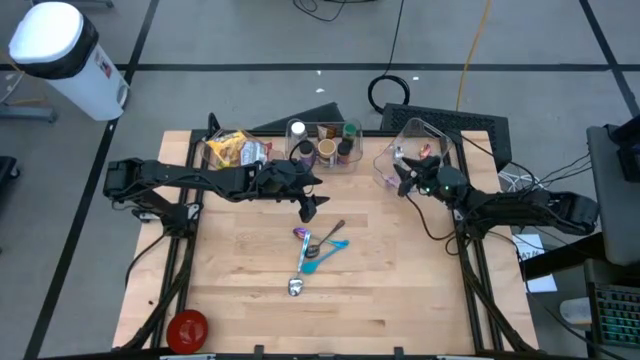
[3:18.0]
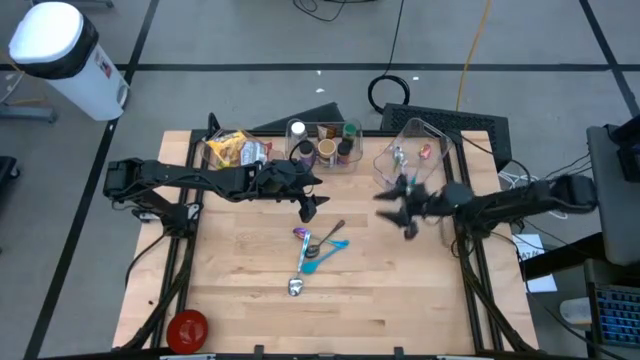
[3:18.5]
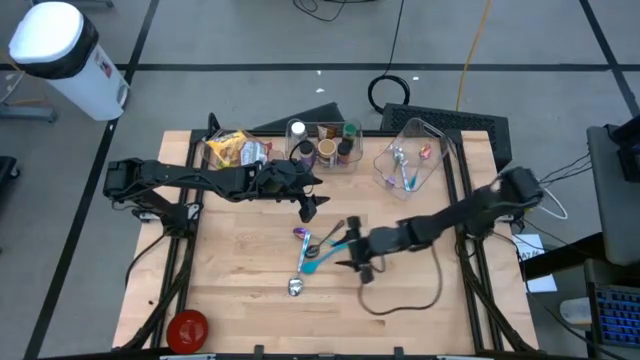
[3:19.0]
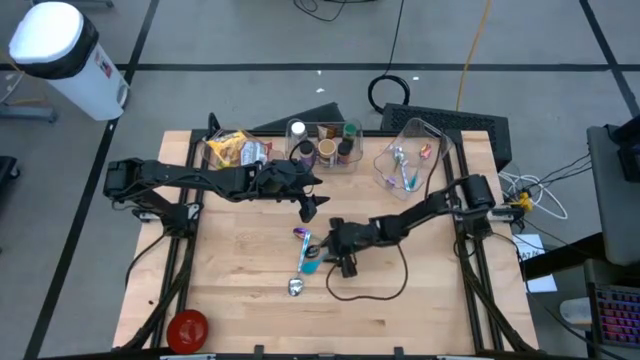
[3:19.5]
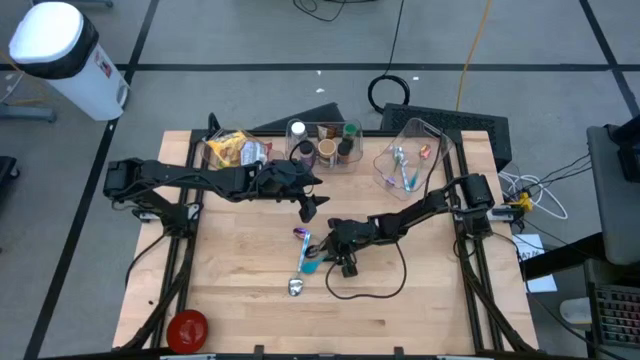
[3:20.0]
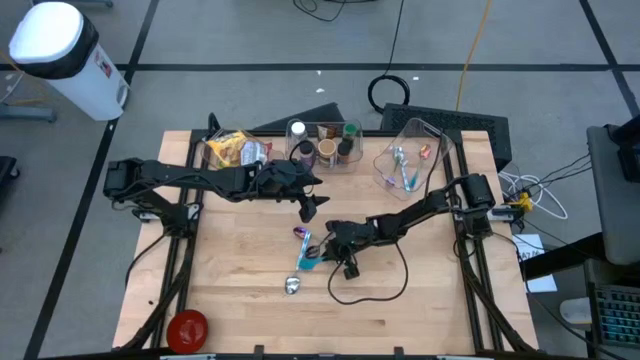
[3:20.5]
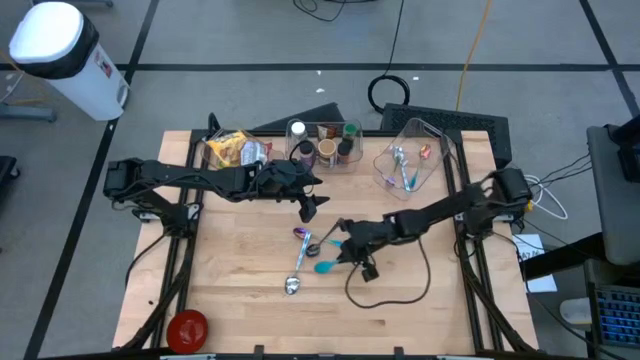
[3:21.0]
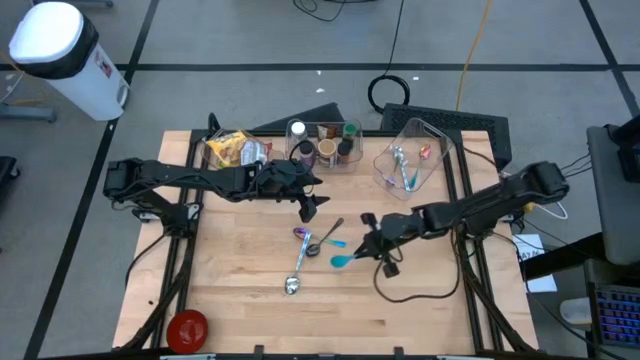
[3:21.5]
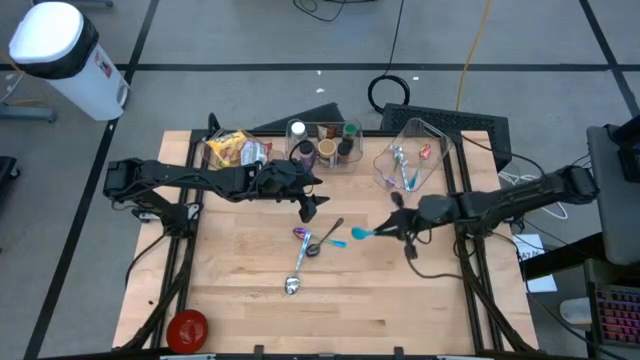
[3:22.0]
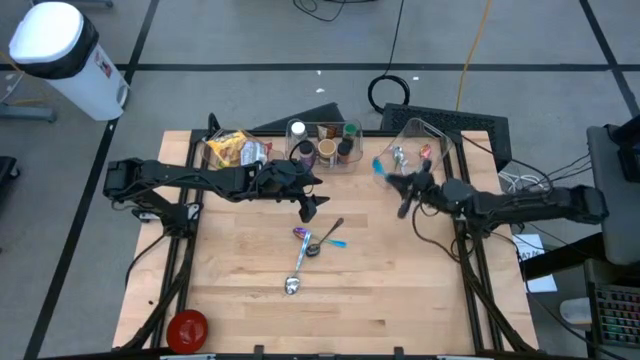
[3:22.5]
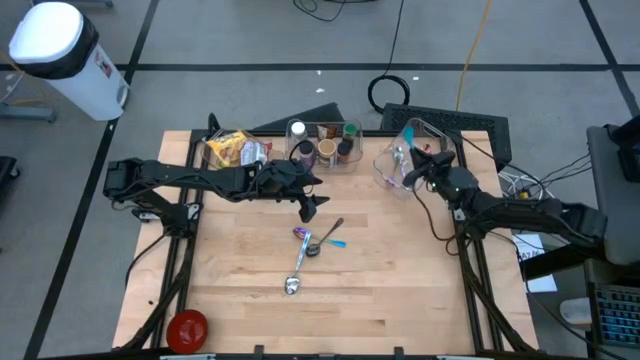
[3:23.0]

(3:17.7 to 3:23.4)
Task: Pick & Place Food Item
Put the blue spoon into the right transparent bin

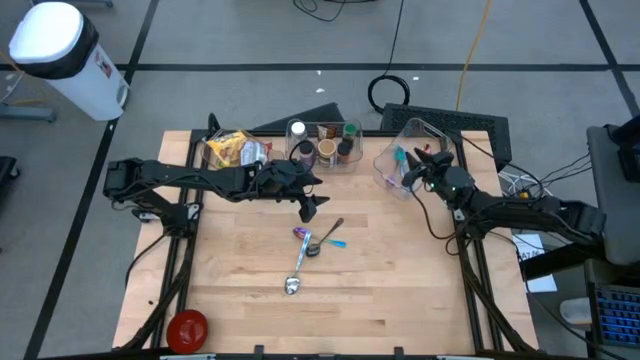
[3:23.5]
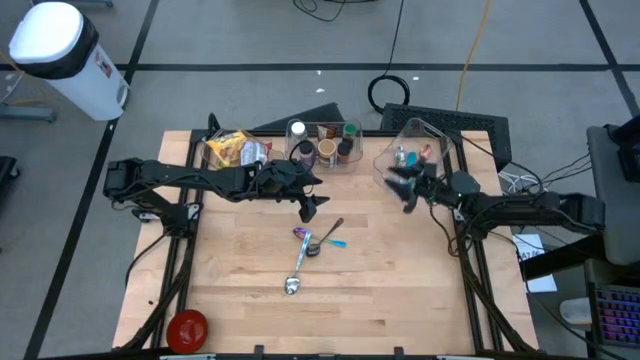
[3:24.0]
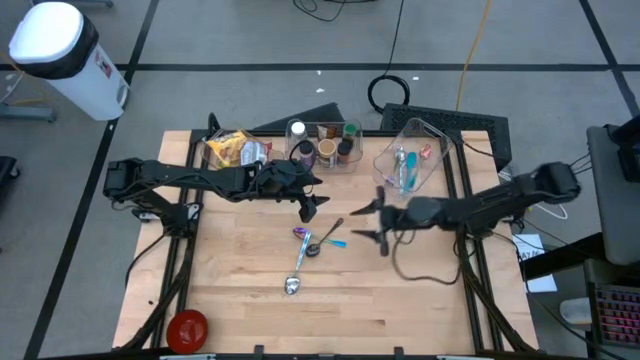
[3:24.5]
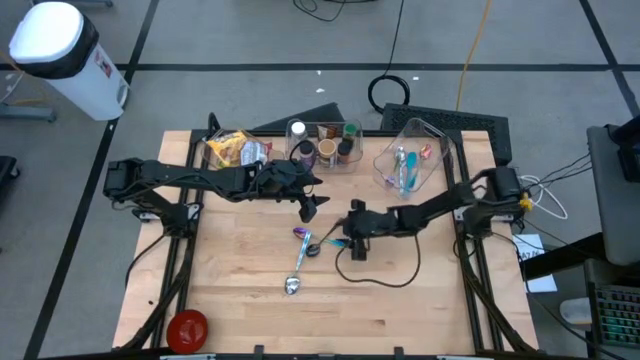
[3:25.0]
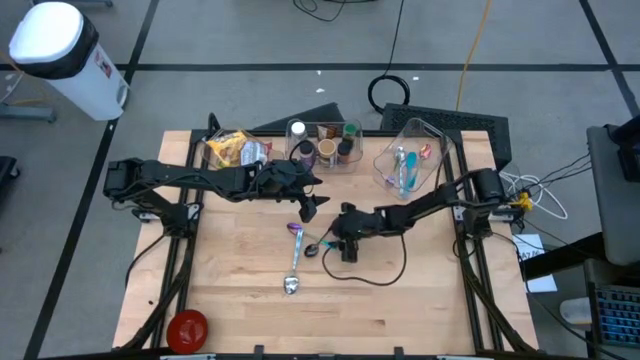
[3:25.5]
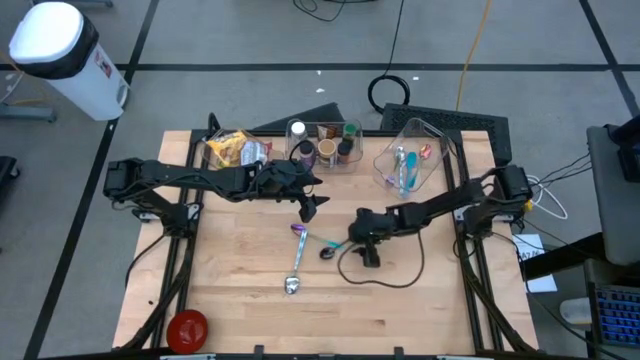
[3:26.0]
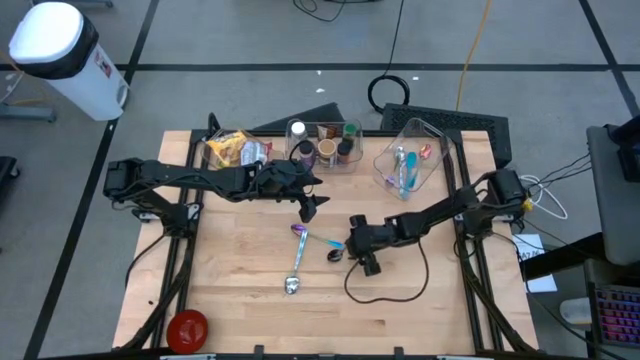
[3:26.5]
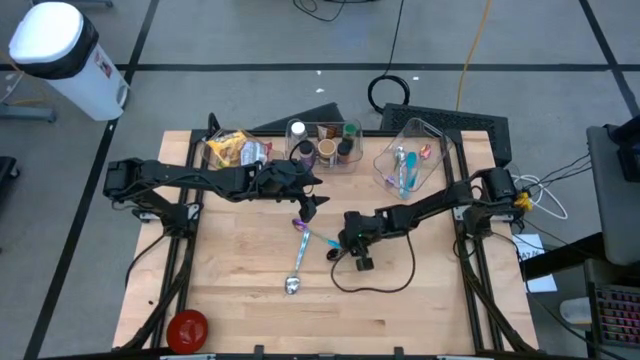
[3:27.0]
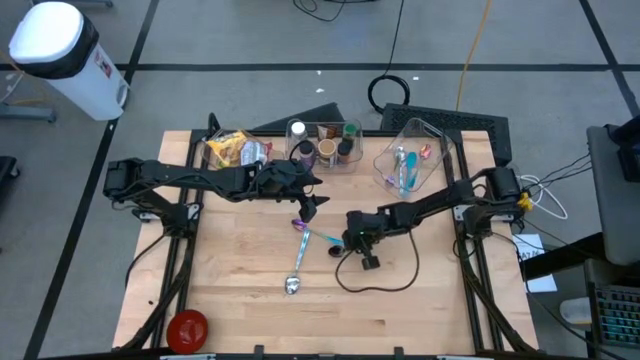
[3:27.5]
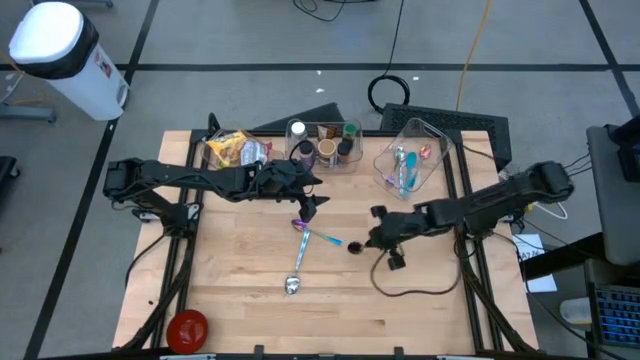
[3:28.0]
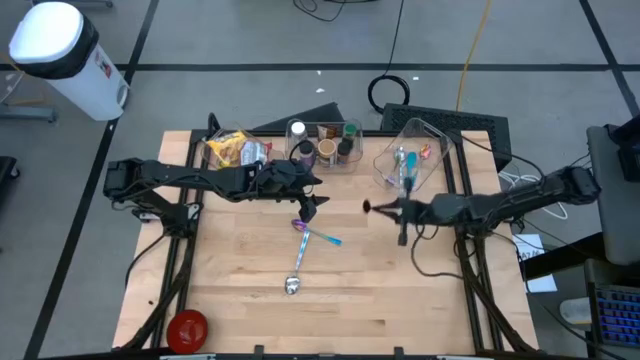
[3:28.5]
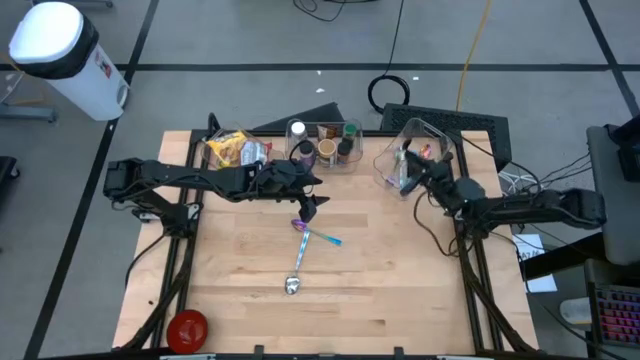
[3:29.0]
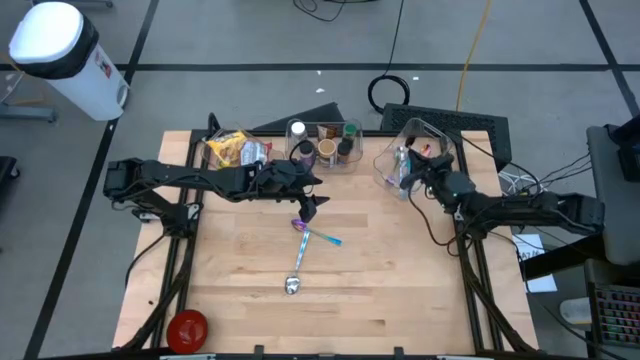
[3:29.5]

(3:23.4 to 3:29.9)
Put the black spoon into the right transparent bin

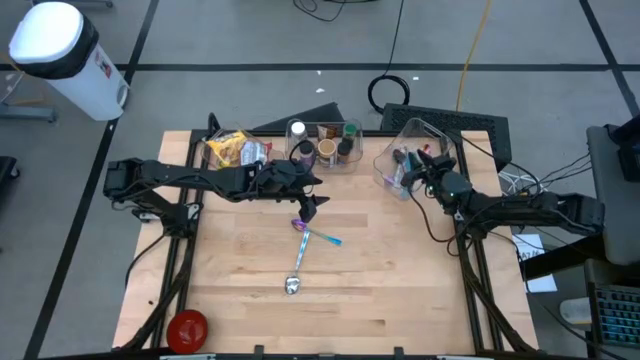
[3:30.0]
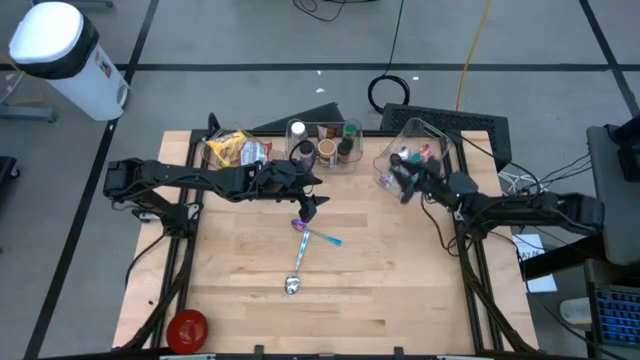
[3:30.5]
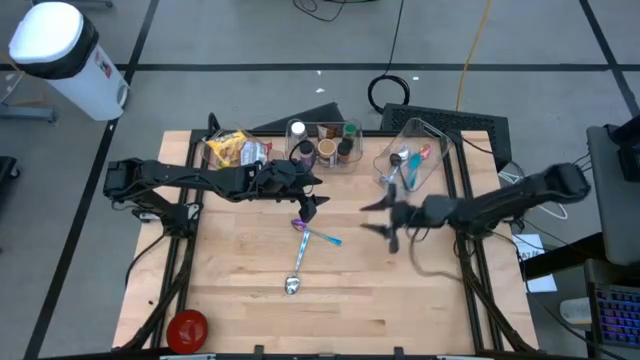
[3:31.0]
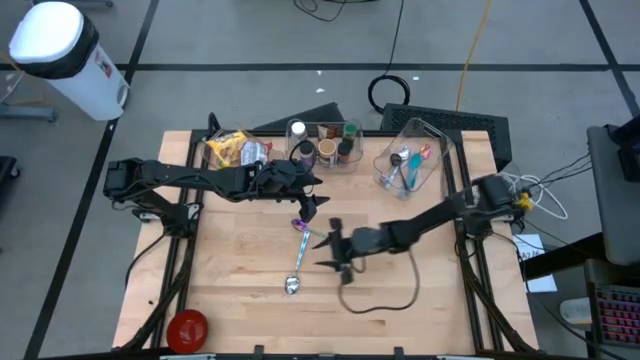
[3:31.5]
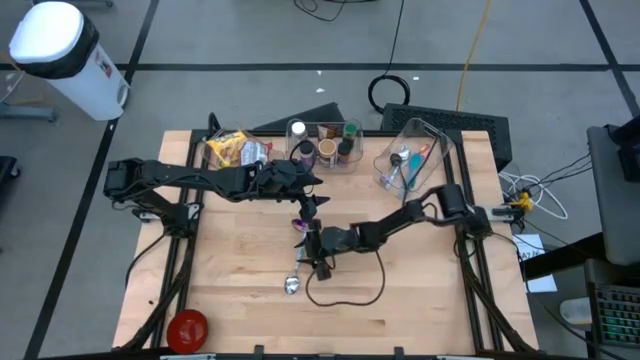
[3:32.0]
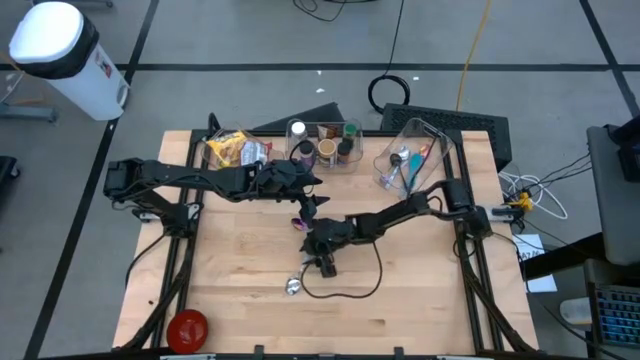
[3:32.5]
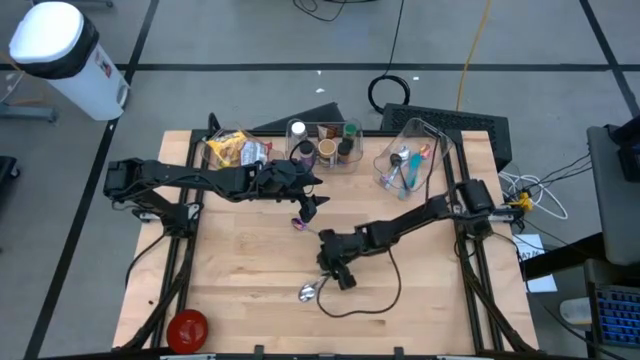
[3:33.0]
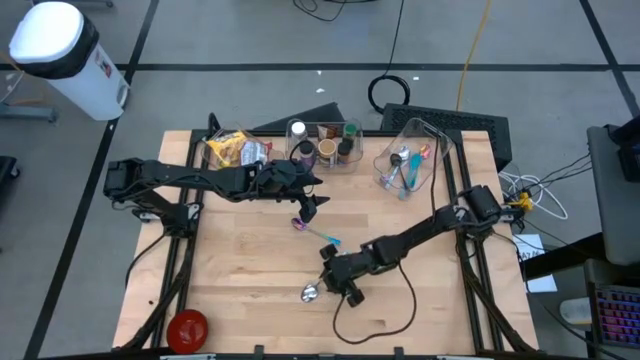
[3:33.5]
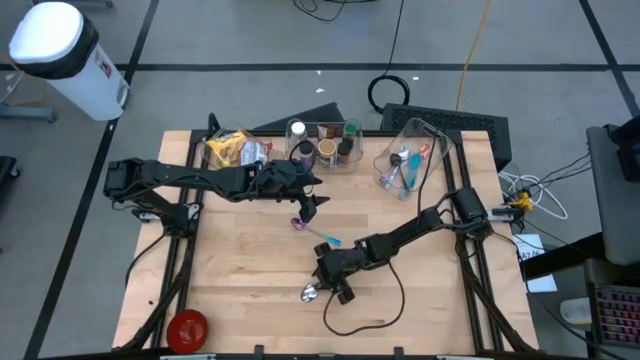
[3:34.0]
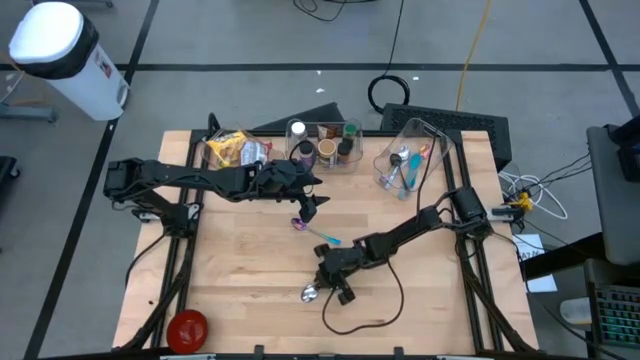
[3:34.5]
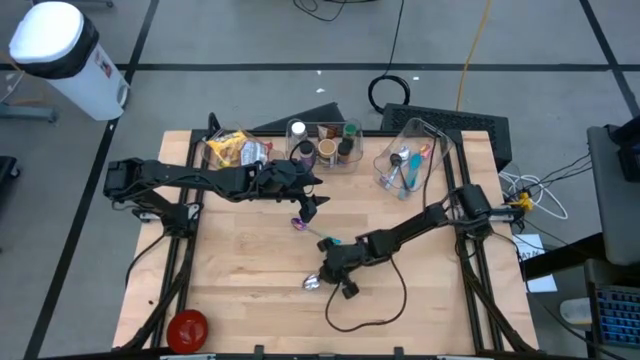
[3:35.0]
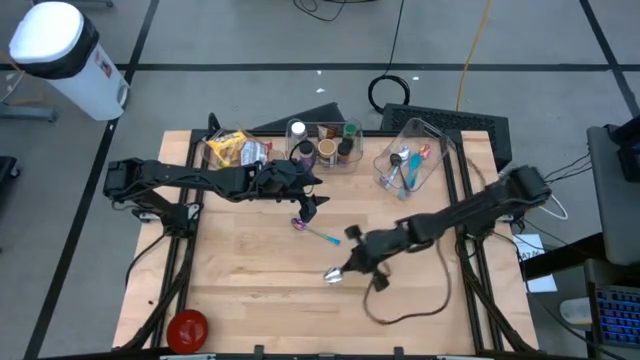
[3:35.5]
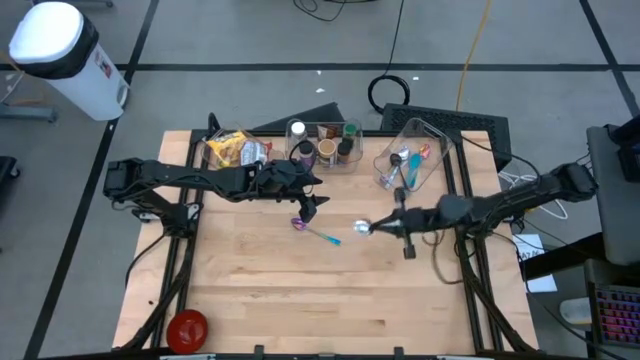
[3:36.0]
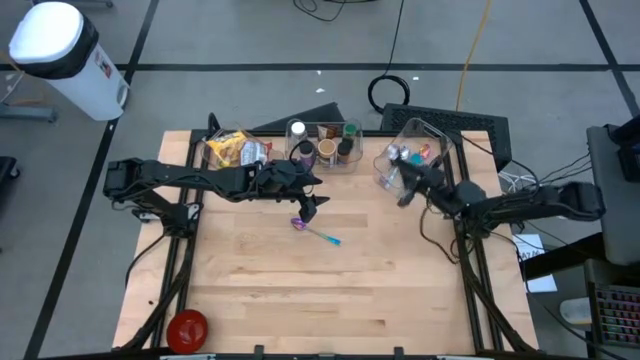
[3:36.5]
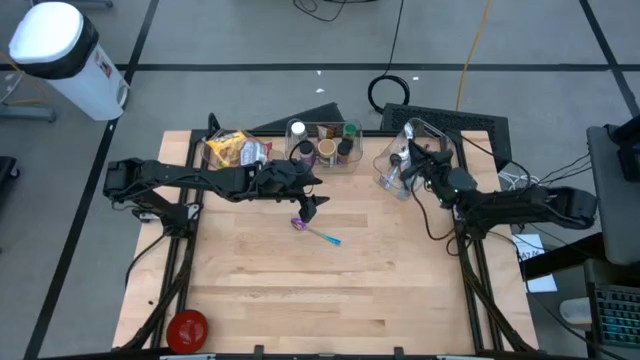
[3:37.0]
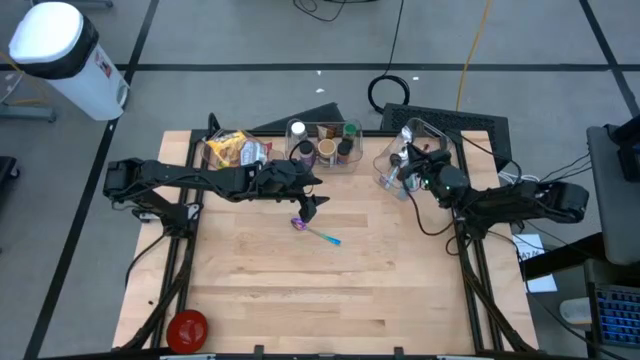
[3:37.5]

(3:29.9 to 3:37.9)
Put the white patterned spoon into the right transparent bin

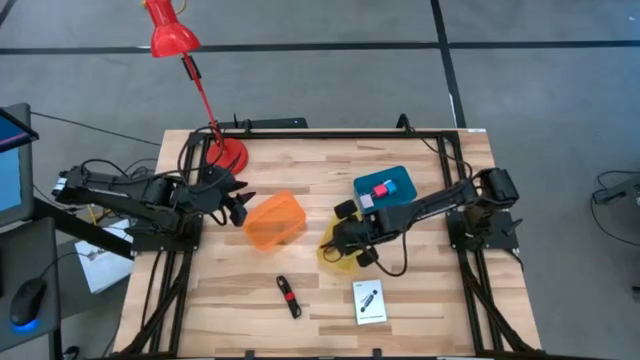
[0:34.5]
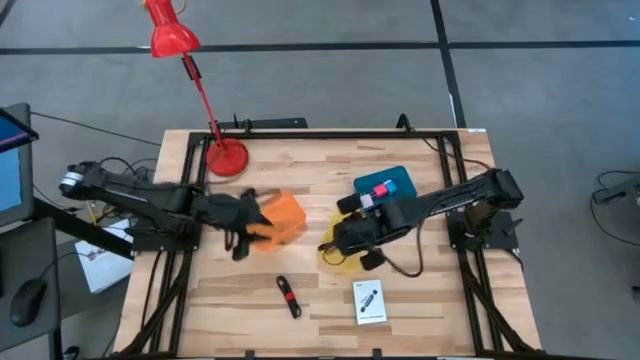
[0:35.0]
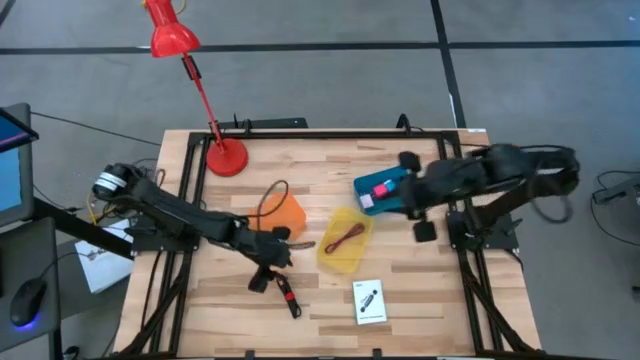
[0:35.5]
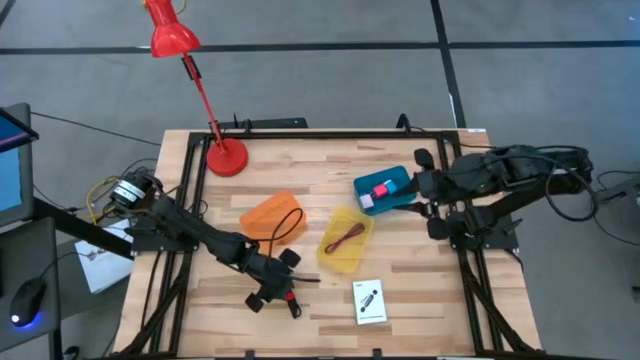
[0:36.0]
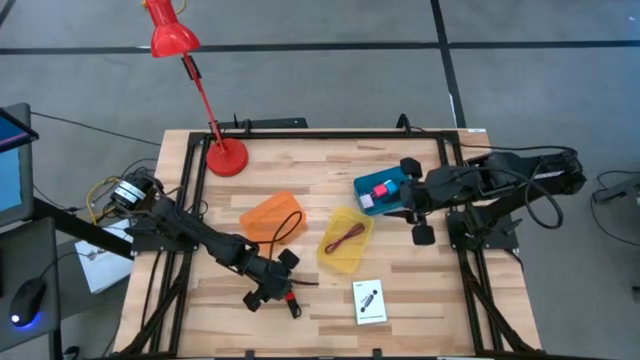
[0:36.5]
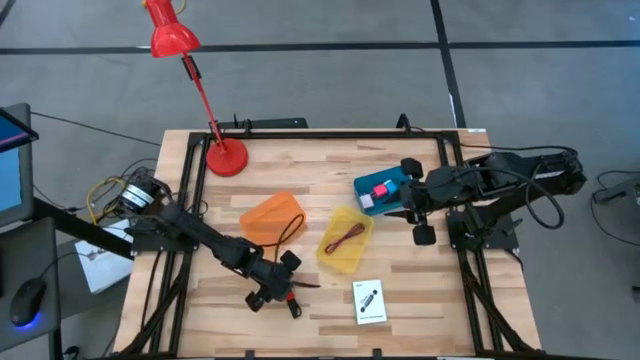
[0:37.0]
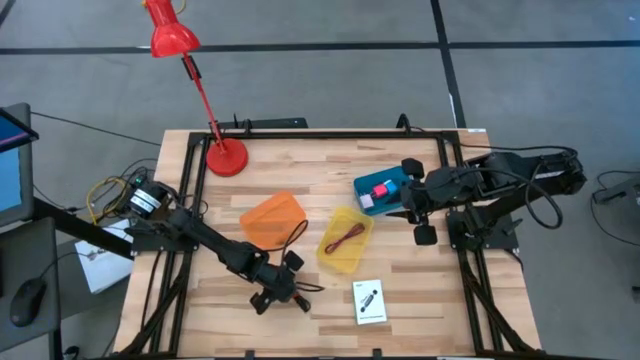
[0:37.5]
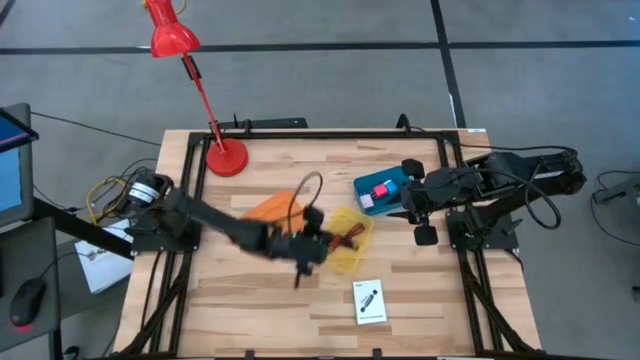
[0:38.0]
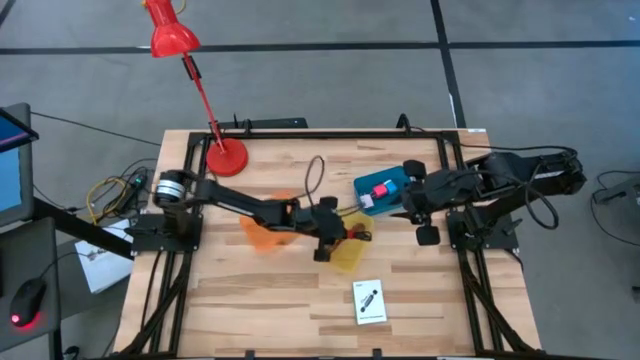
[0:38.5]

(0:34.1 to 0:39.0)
Task: Pick and place items into bin
Put the black charger cable into the yellow bin
